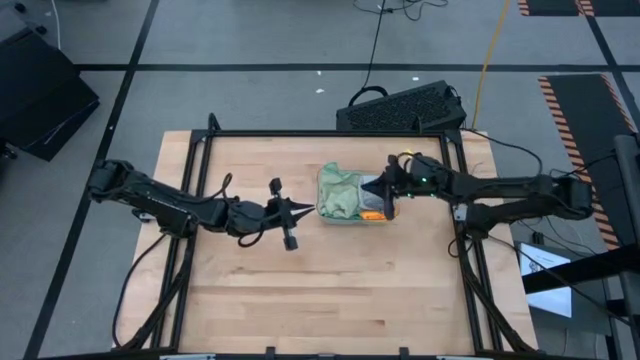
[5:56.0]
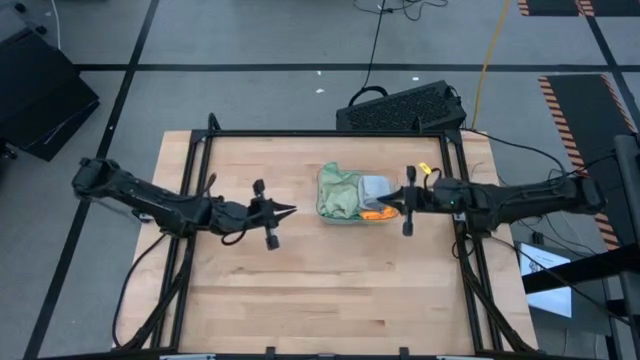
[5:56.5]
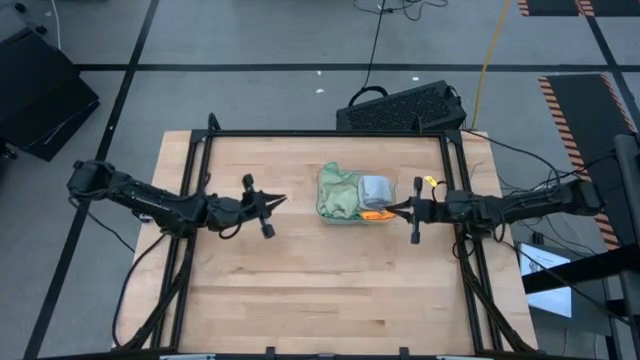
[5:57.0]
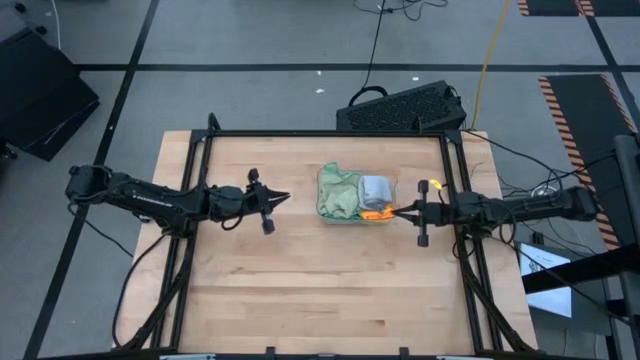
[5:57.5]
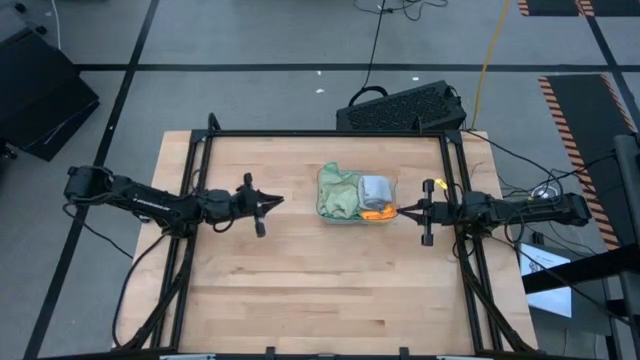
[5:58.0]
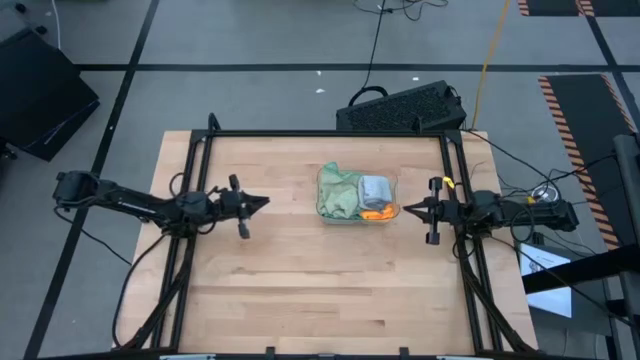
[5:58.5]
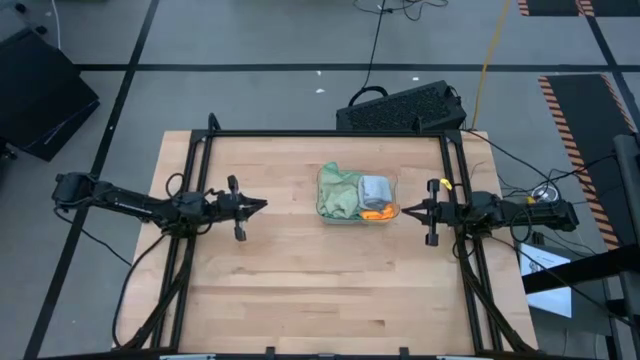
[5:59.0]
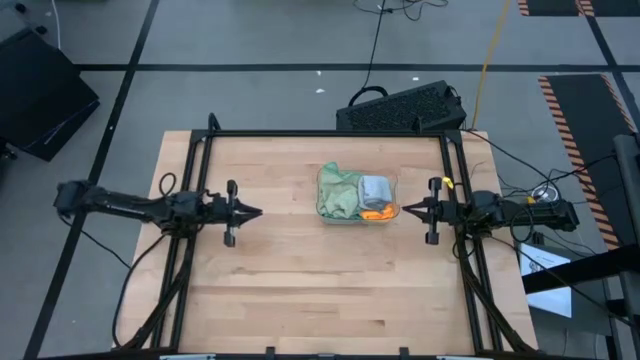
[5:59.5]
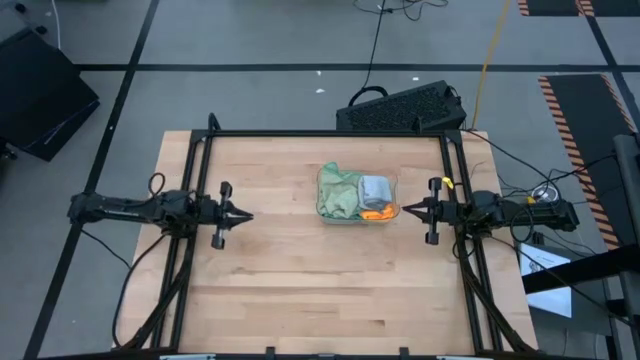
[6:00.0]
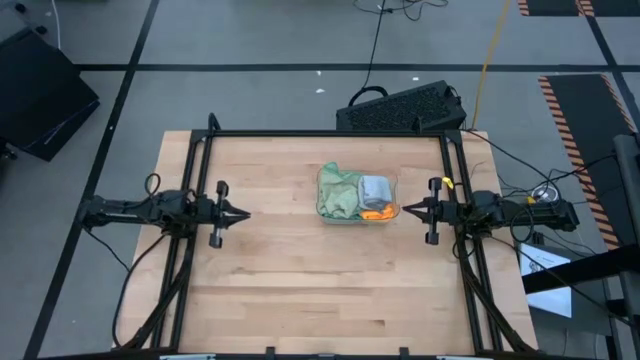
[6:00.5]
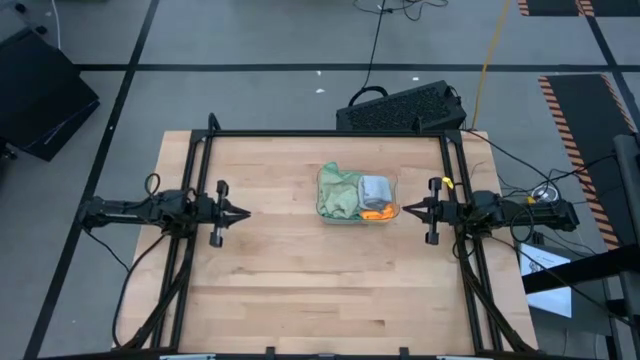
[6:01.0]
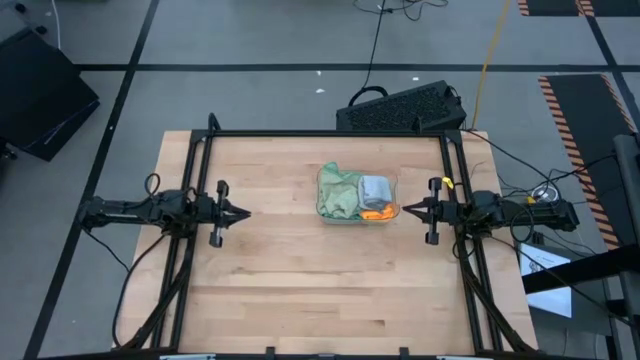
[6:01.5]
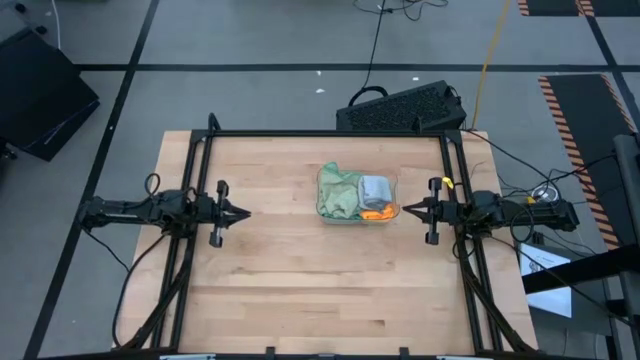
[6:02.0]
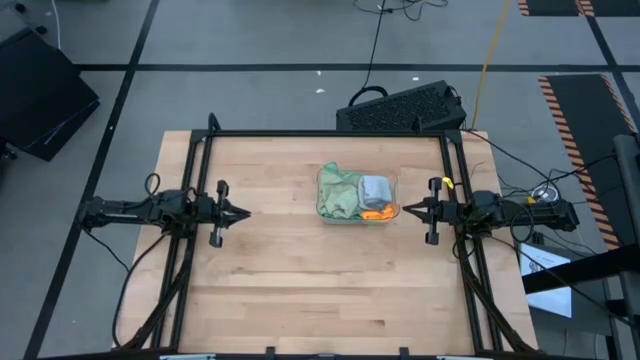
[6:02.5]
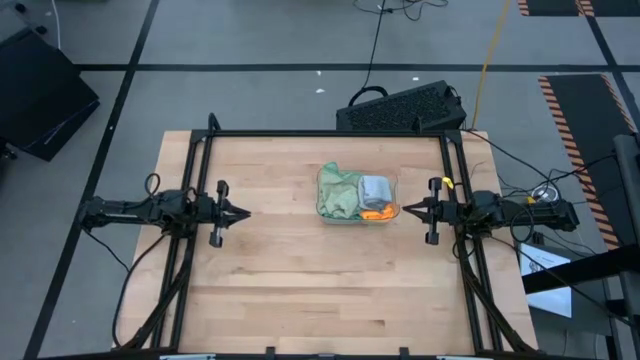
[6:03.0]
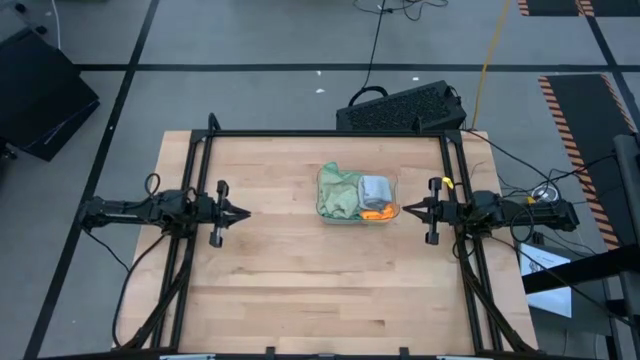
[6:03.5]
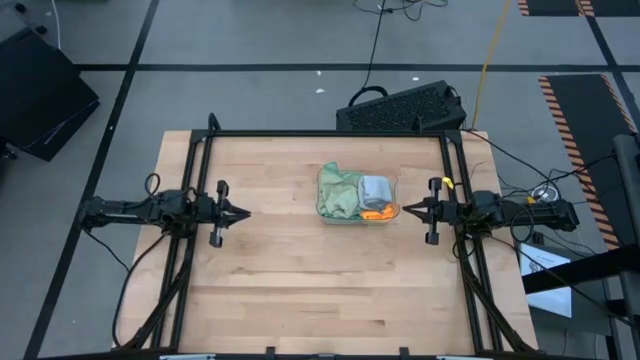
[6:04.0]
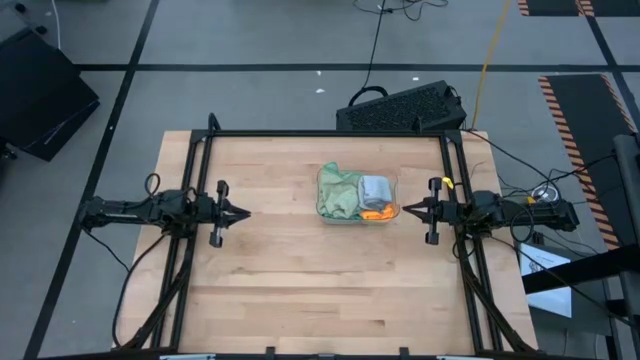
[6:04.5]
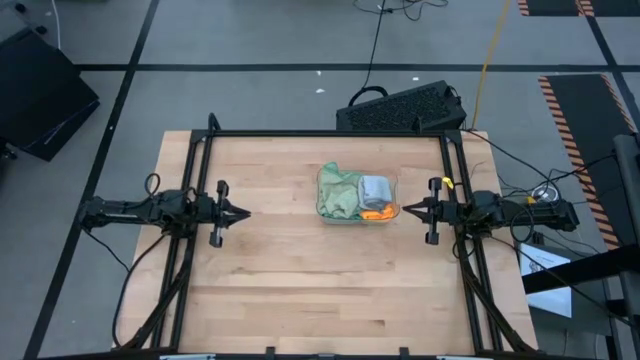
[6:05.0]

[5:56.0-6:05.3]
Task: Fold microfiber towels
Return to Home Position

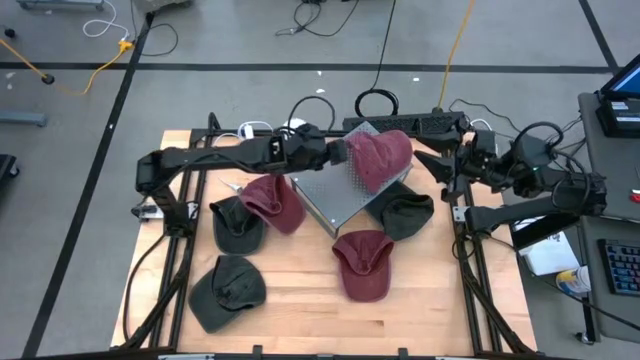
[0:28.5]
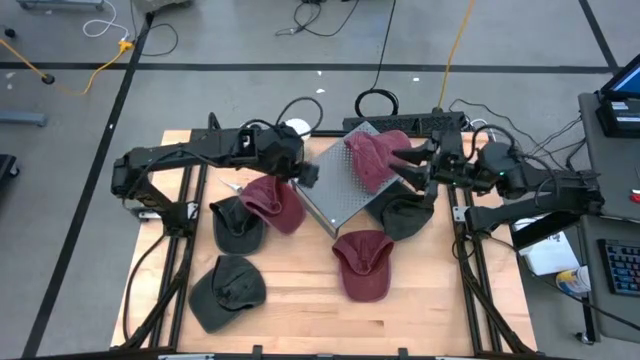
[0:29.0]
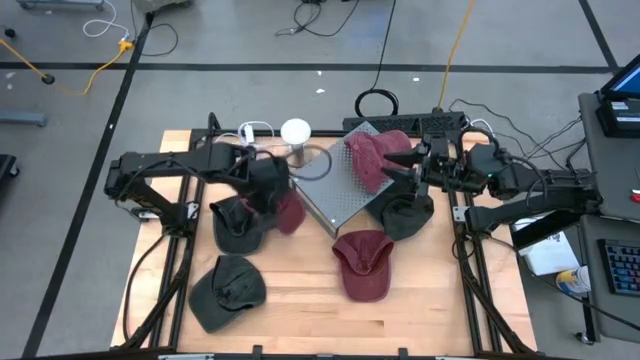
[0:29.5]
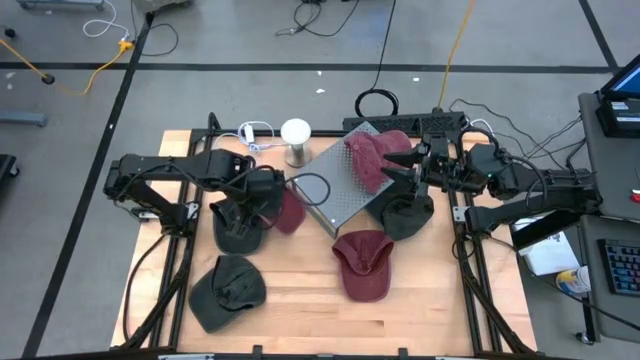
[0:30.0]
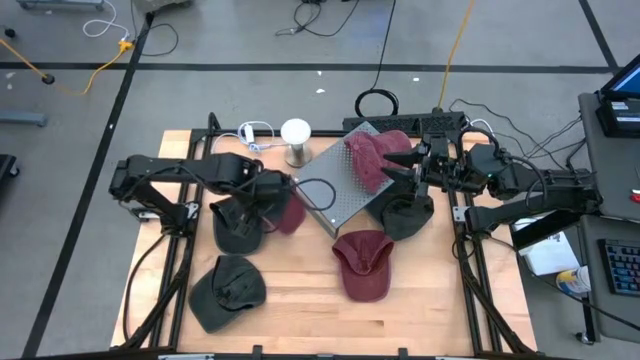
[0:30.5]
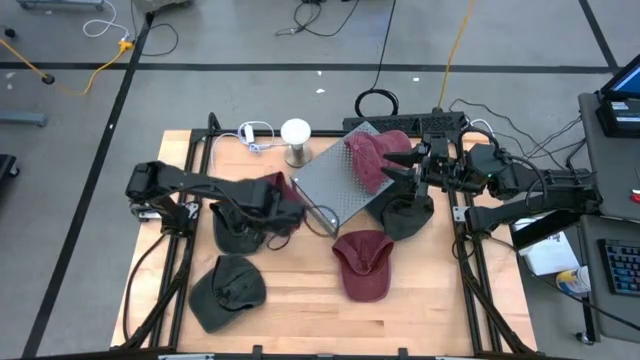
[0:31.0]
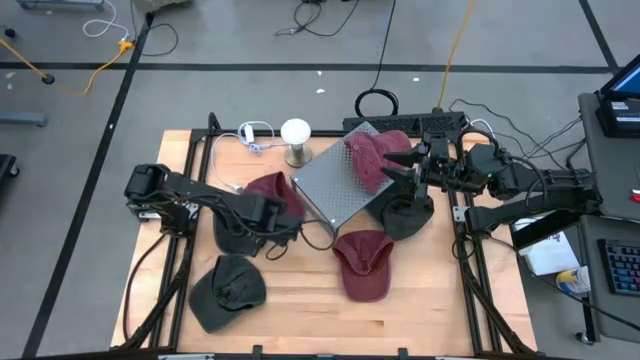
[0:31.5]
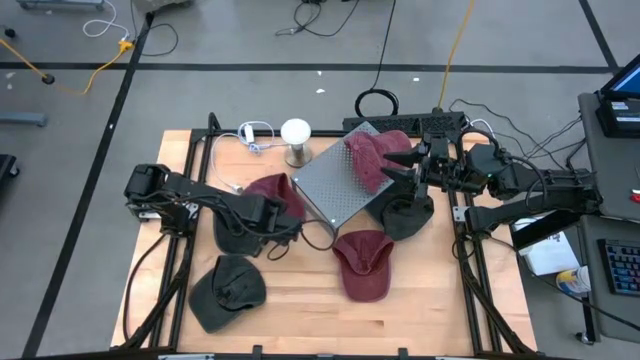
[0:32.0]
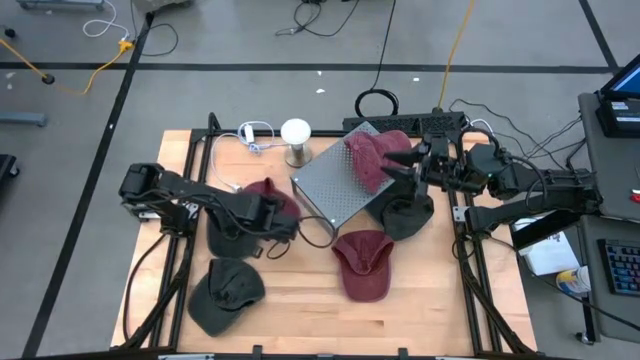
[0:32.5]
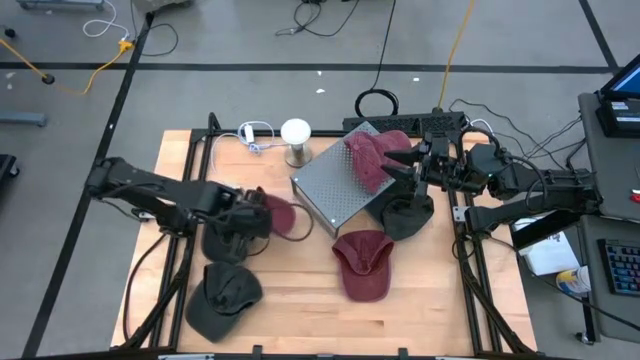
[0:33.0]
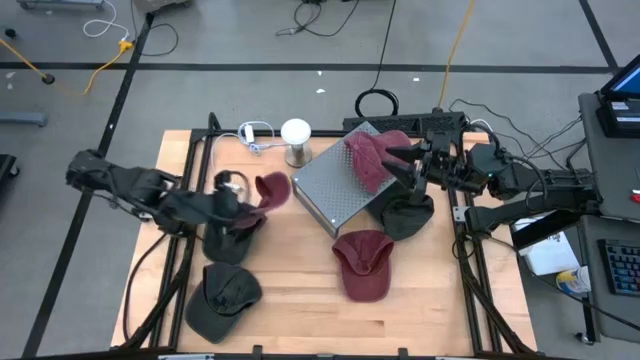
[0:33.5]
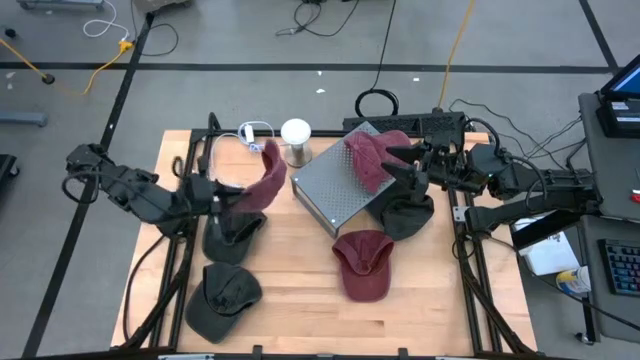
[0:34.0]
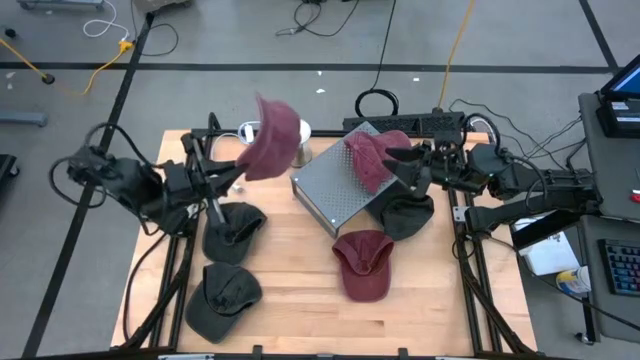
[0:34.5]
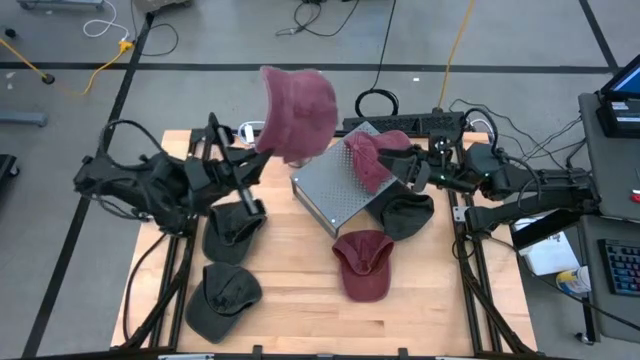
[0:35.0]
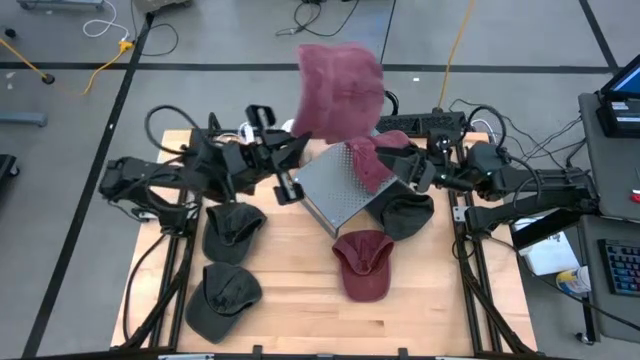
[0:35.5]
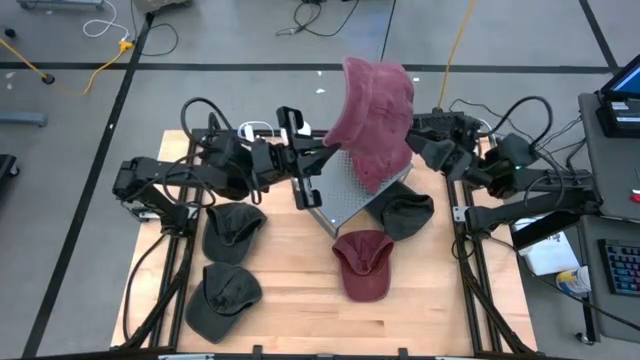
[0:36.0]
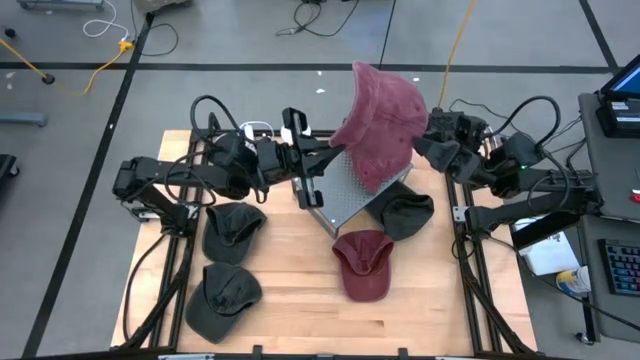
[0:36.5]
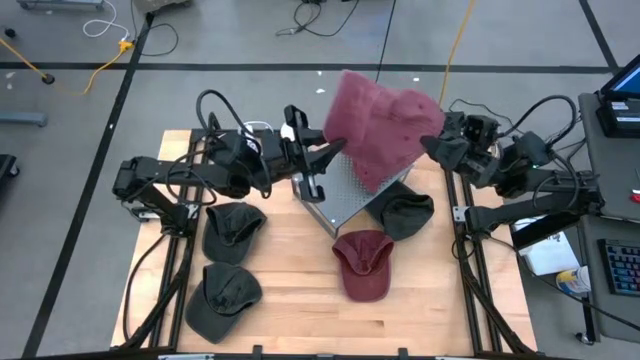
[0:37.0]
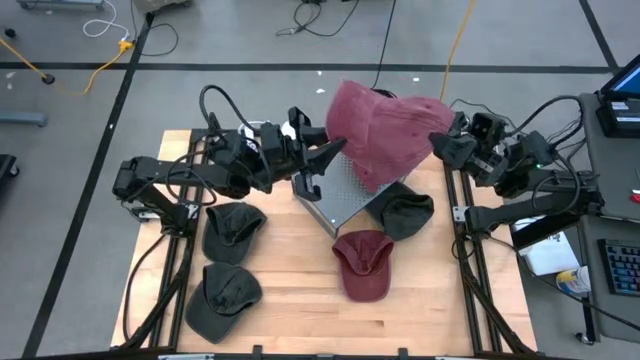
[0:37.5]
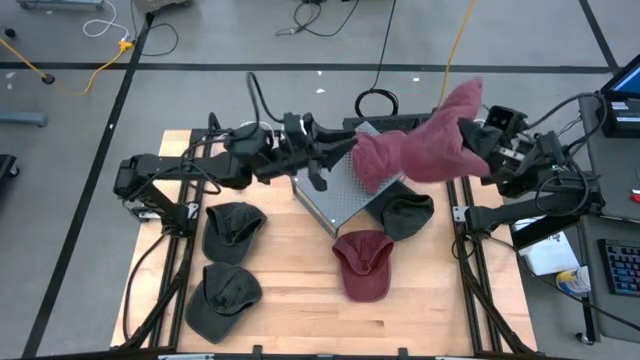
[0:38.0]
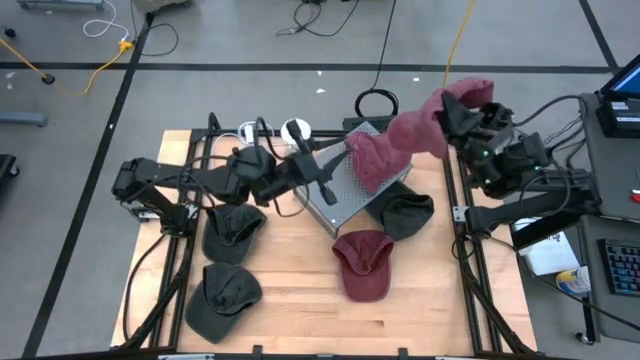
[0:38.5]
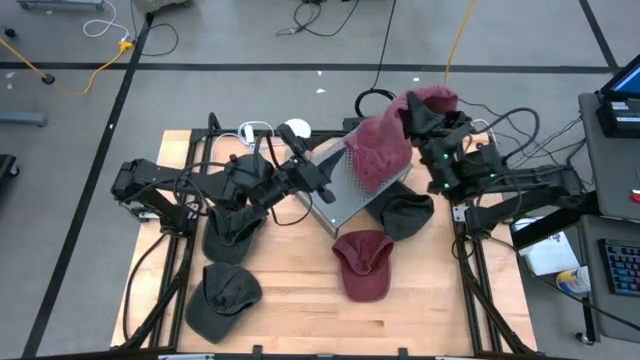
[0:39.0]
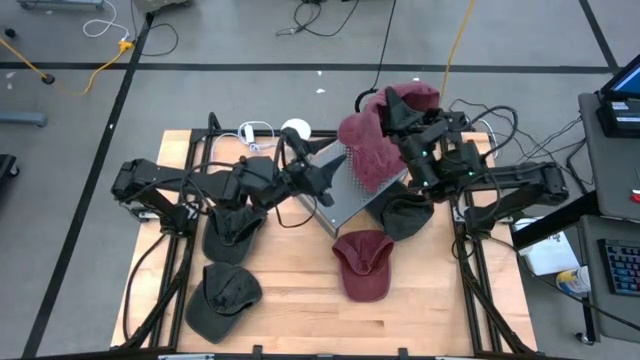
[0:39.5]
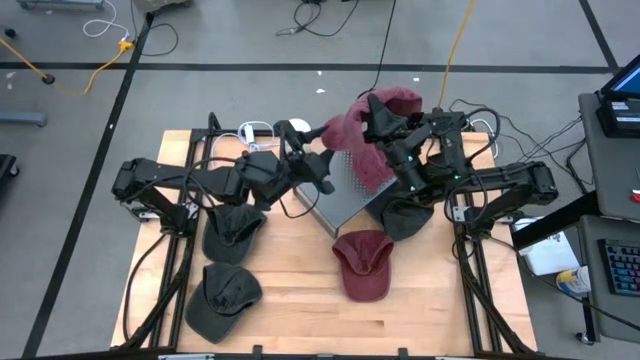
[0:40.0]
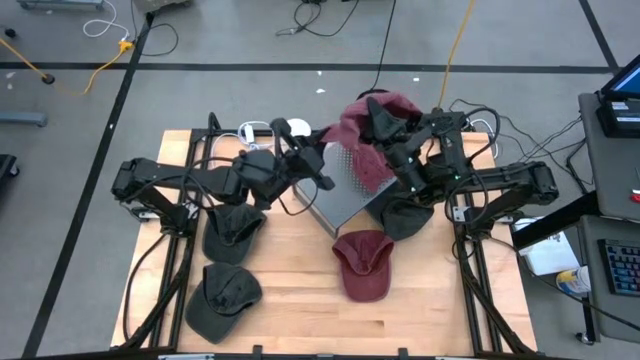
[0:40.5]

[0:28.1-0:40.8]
Task: Pick & Place hat
Stack the left red cap on top of the red cap on the shelf
